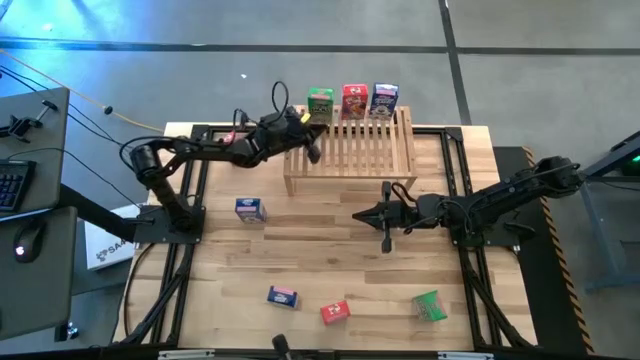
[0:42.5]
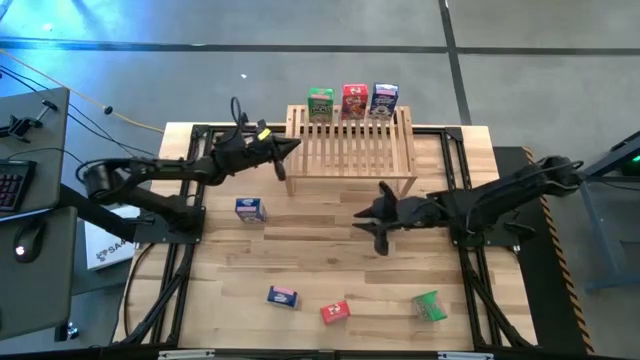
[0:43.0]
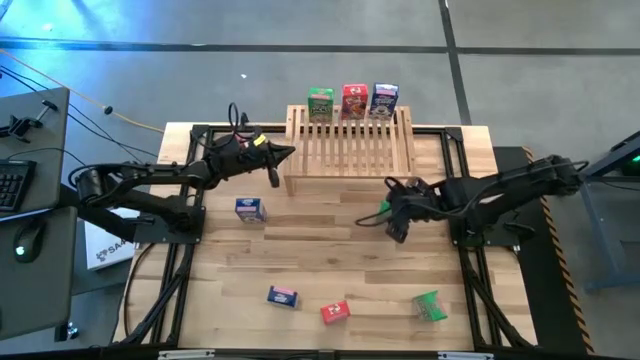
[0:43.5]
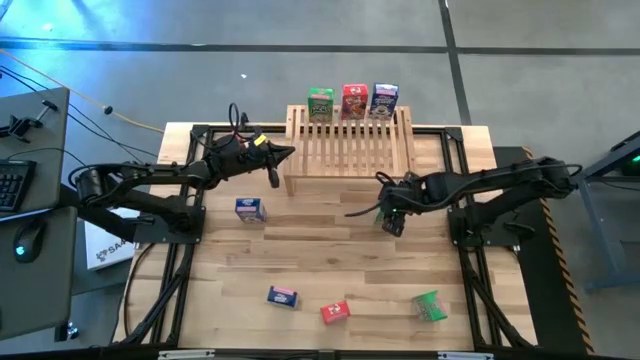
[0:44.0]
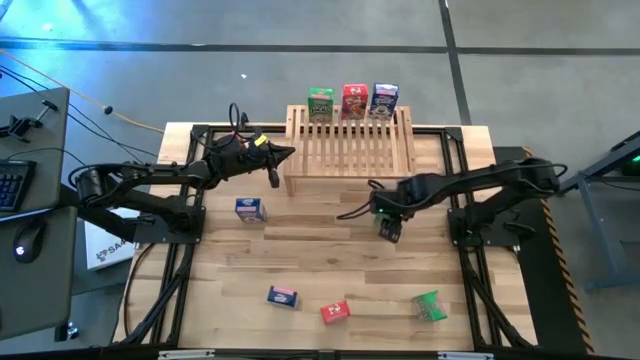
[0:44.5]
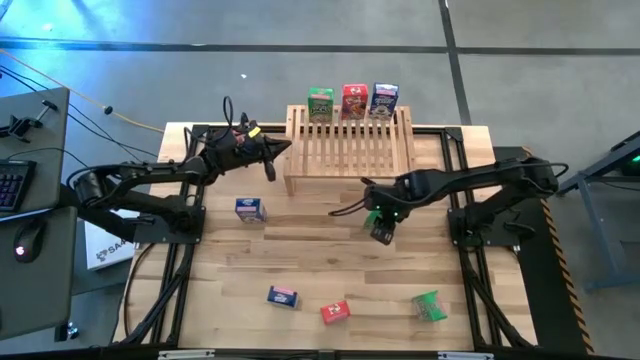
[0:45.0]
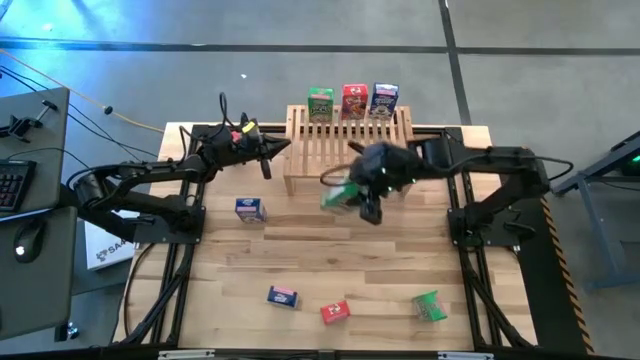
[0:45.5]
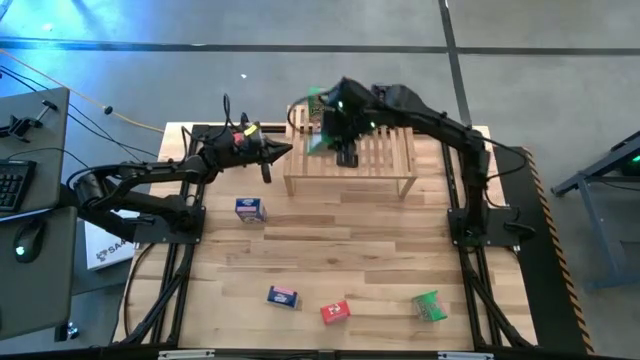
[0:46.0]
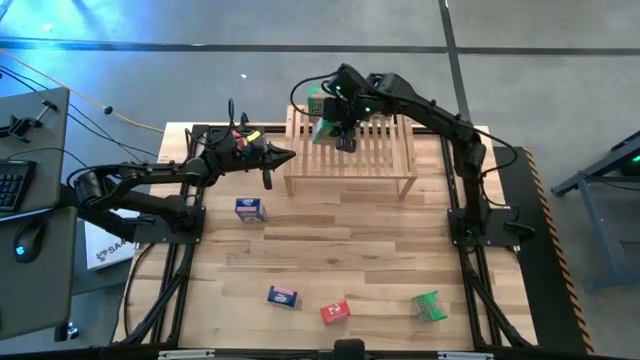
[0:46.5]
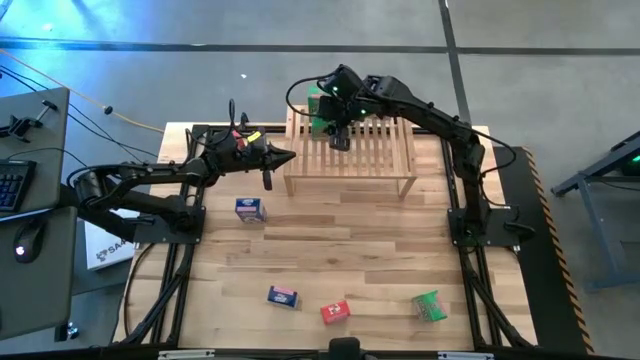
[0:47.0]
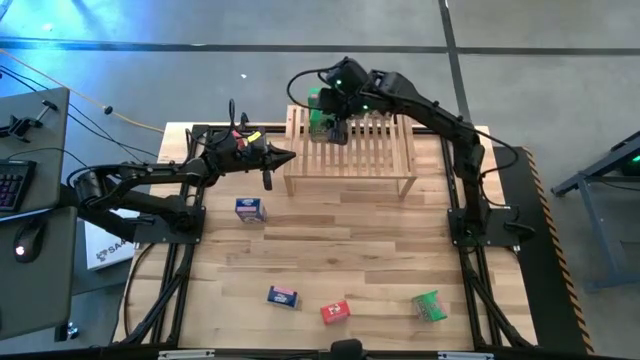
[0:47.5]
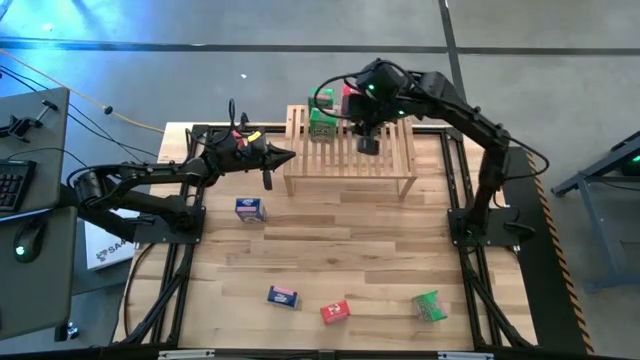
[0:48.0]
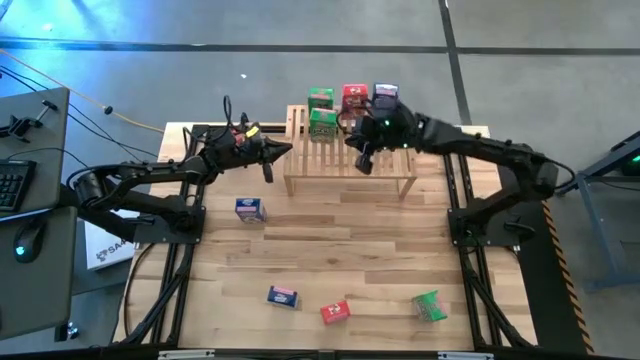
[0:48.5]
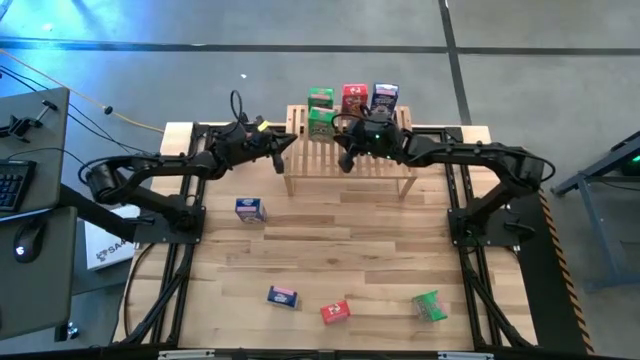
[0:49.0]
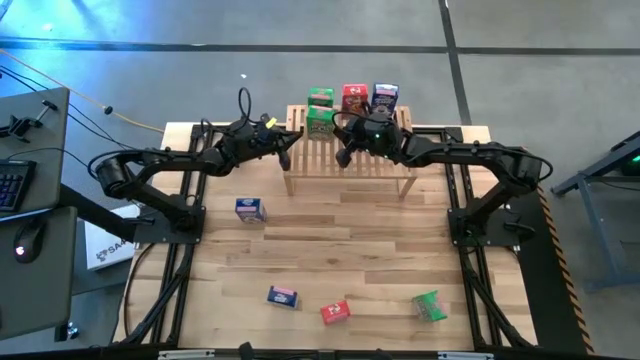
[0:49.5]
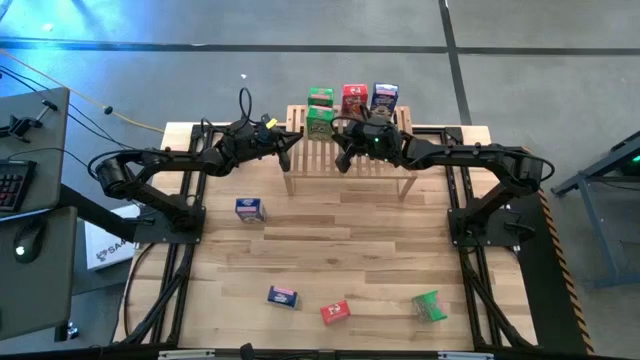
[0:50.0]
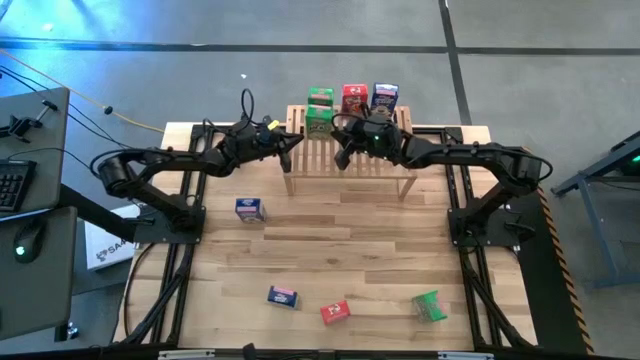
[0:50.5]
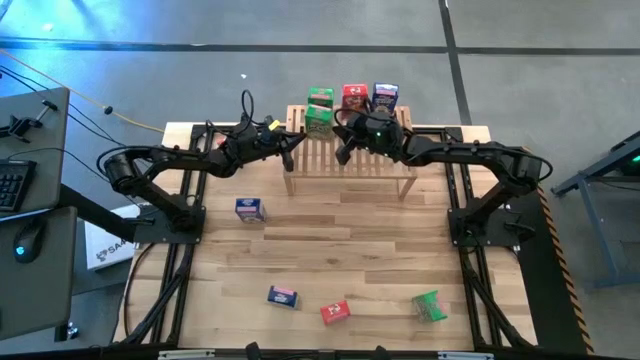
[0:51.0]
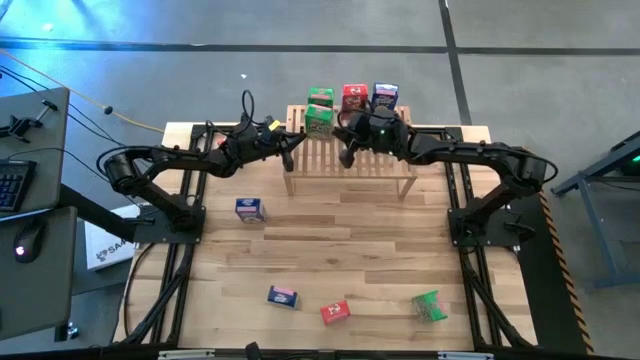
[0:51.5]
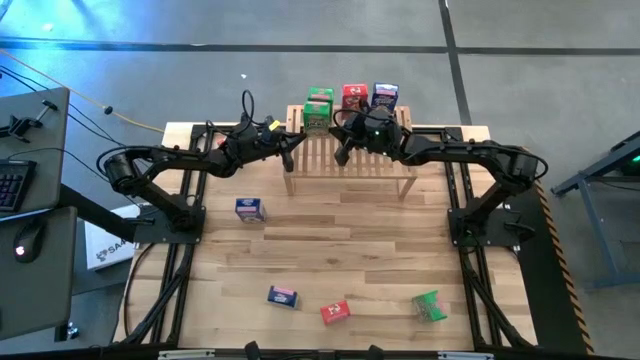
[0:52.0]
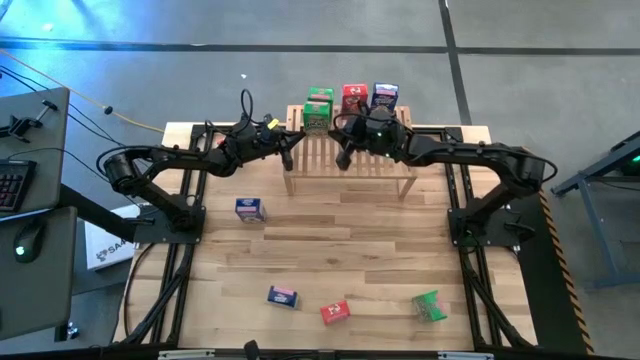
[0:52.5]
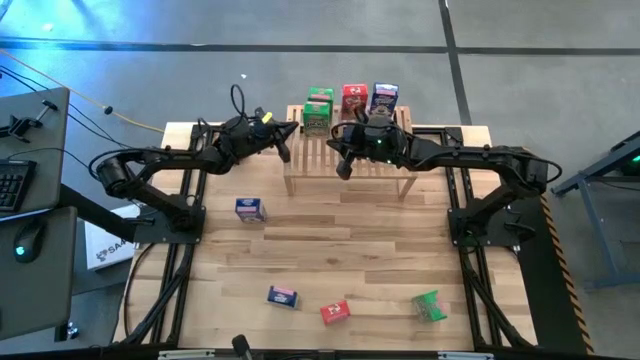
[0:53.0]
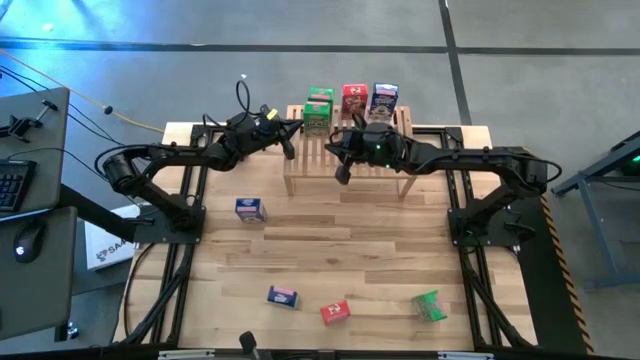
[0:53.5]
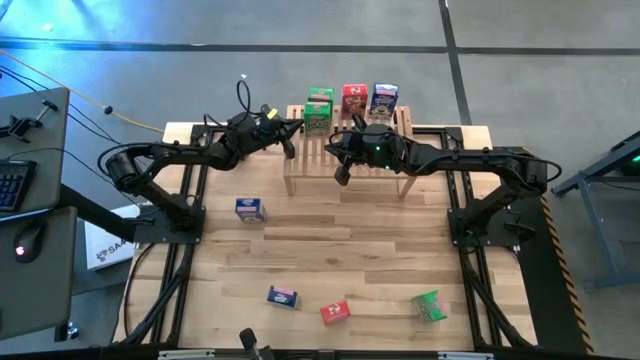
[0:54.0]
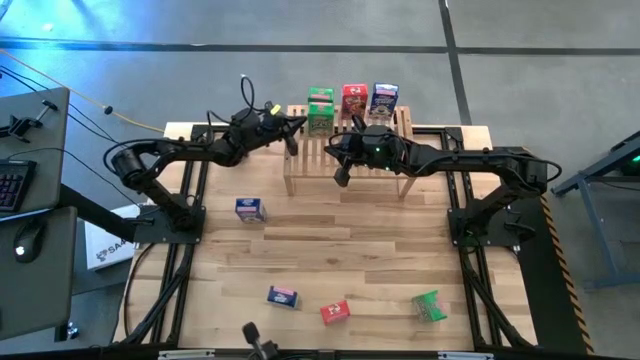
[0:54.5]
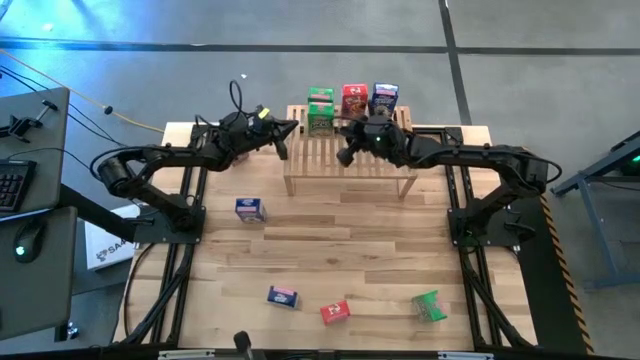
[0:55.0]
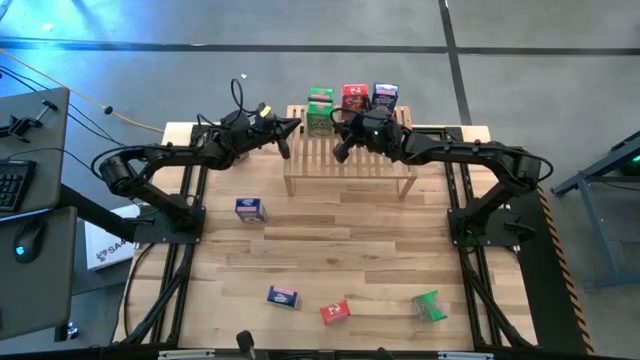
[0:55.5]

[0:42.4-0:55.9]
Task: Stack cereal on shelf
Put the top green cereal box on the shelf aligned with the other green cereal box

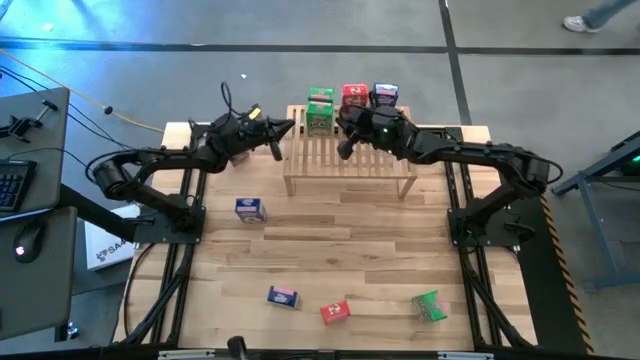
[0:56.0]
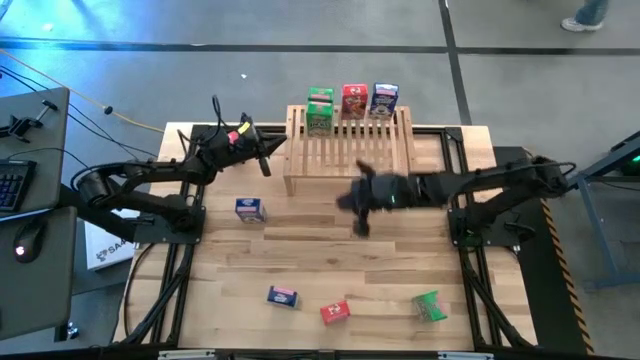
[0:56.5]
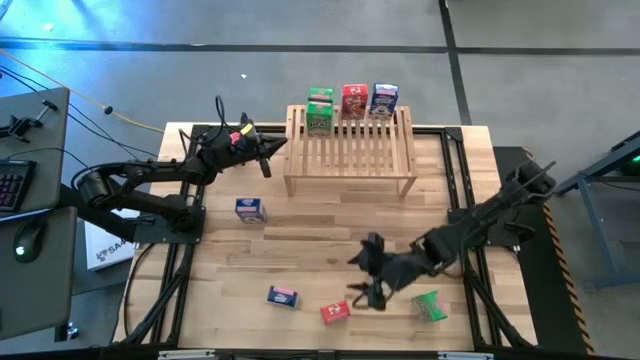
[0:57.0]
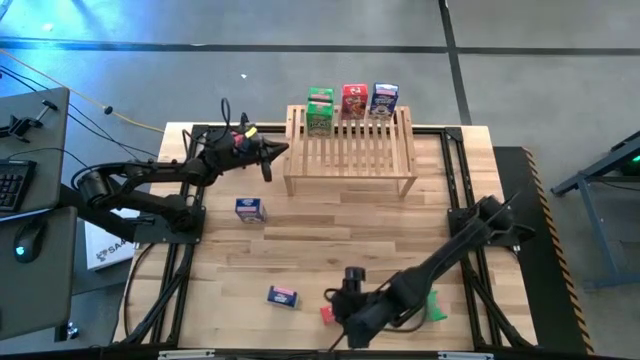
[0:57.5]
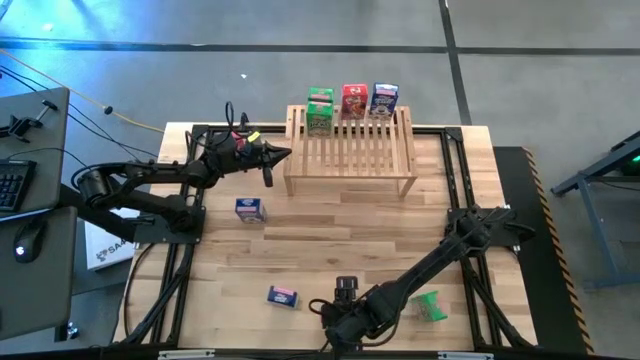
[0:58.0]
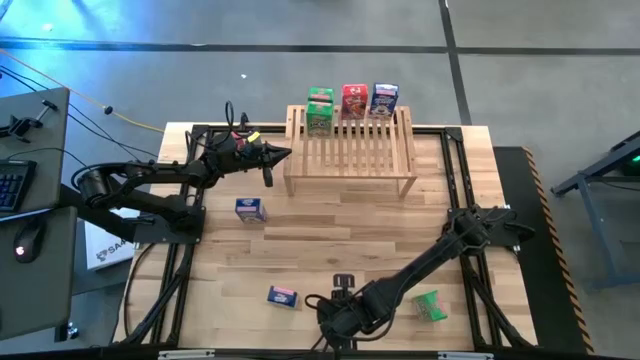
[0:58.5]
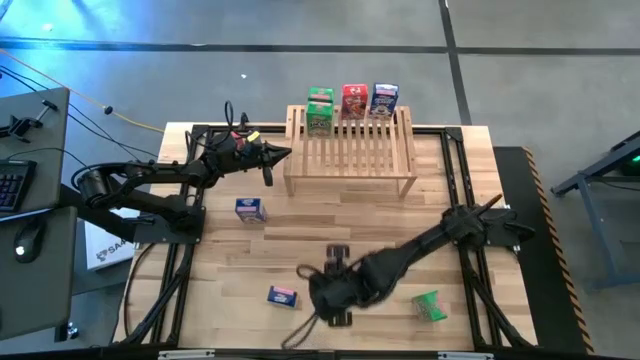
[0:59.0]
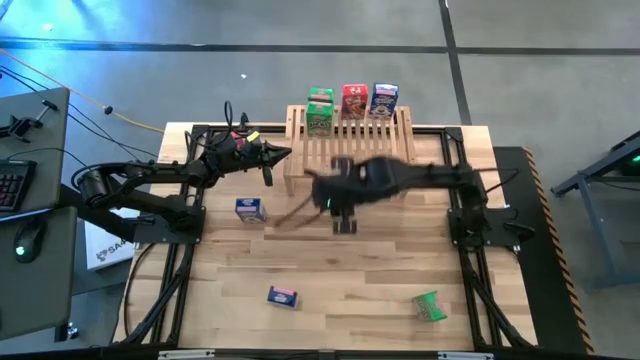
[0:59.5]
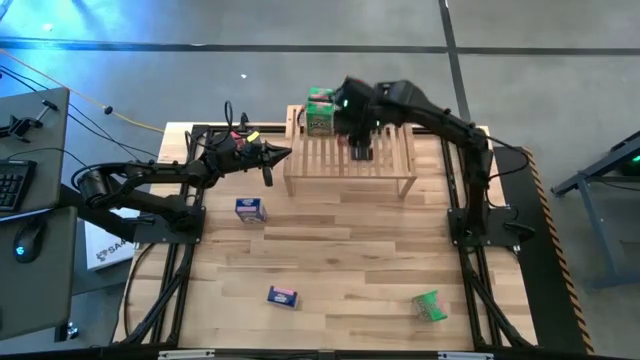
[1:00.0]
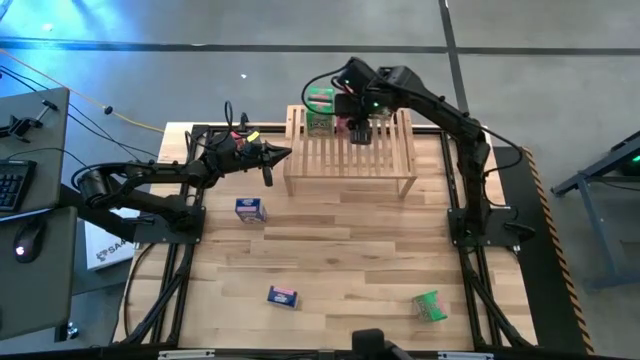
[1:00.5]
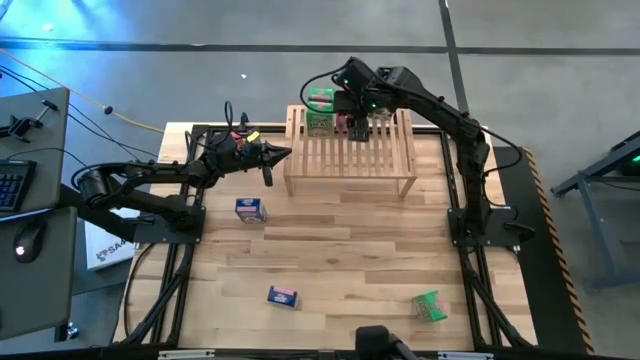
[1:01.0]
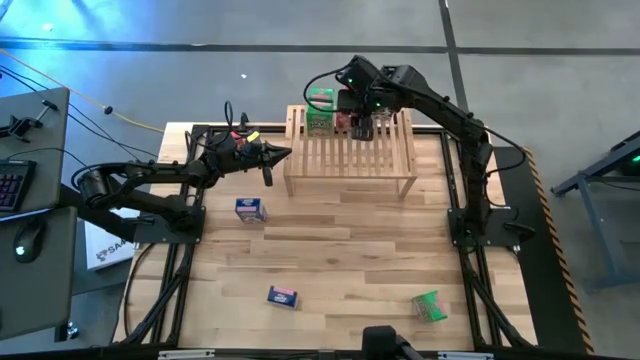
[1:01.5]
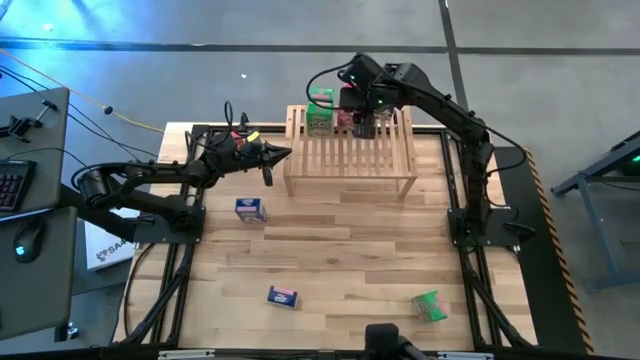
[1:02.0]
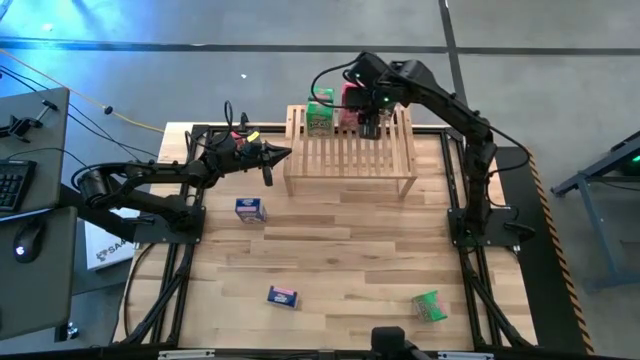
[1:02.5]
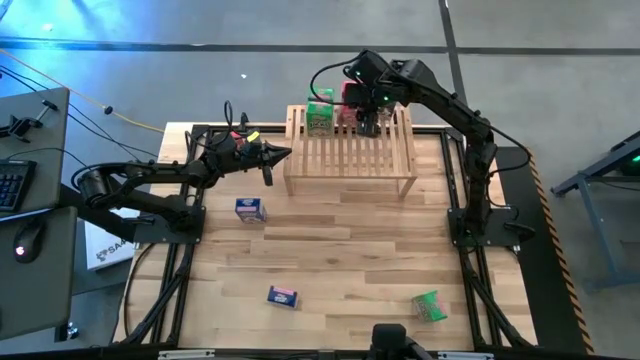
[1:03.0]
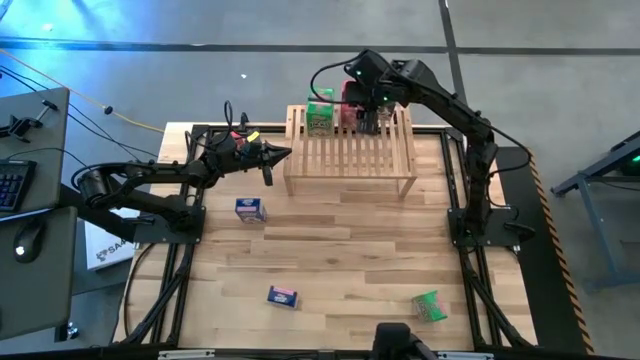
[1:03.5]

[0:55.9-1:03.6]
Put the bottom red cereal box on the shelf aligned with the other red cereal box
